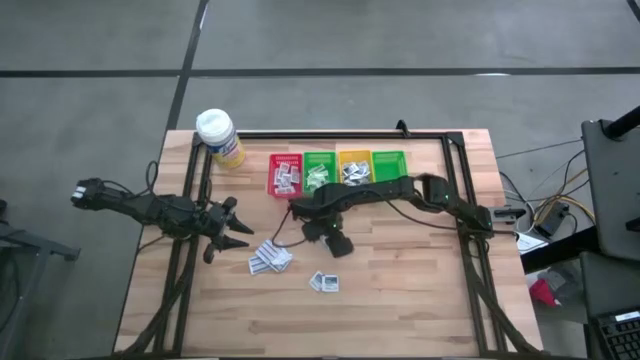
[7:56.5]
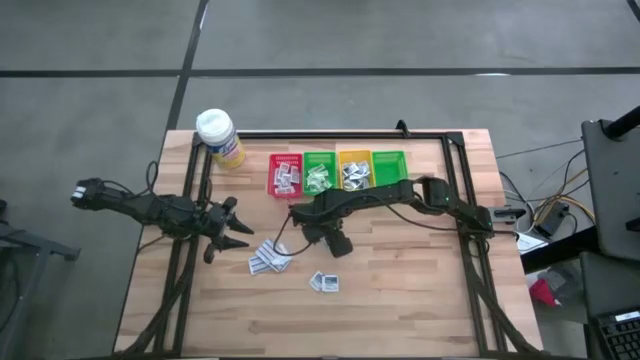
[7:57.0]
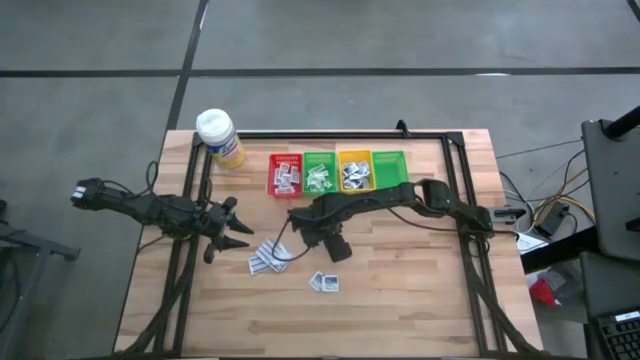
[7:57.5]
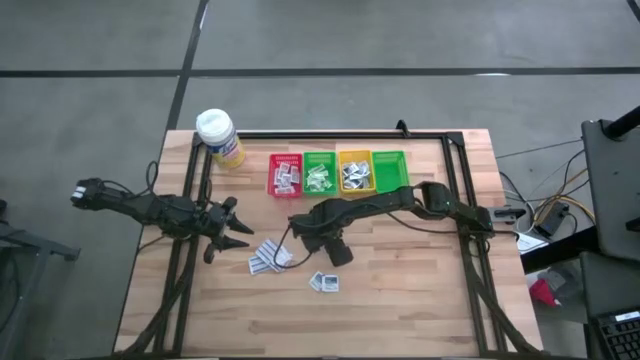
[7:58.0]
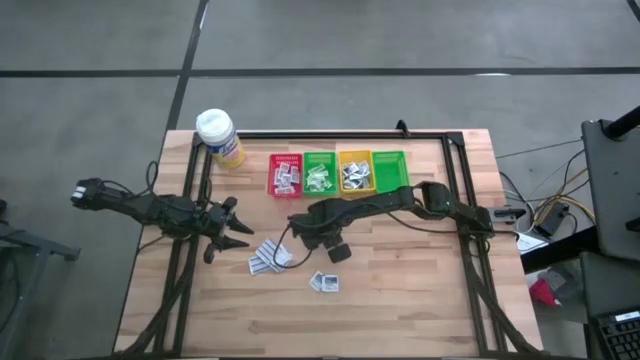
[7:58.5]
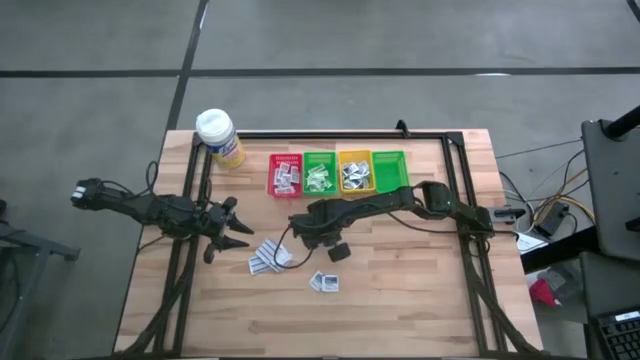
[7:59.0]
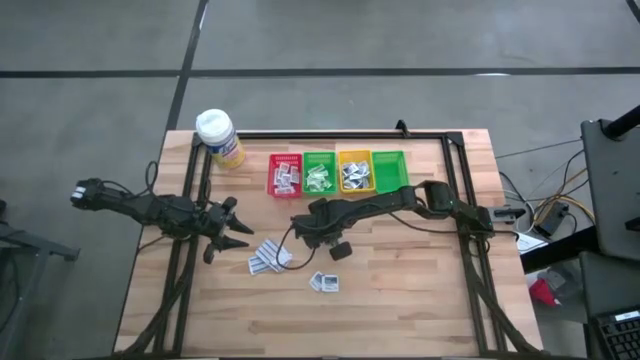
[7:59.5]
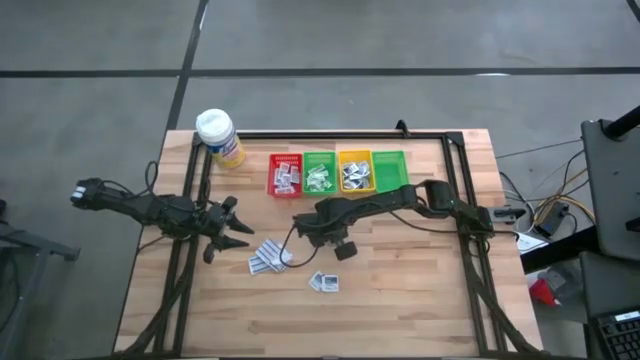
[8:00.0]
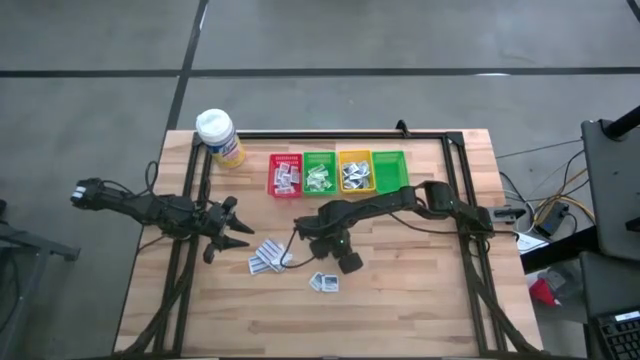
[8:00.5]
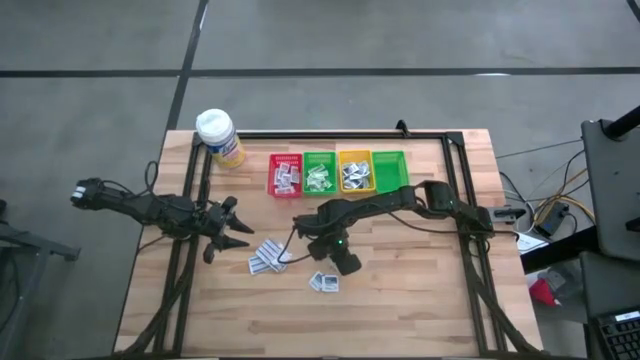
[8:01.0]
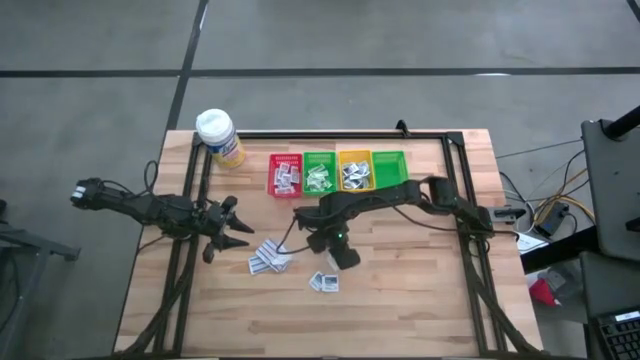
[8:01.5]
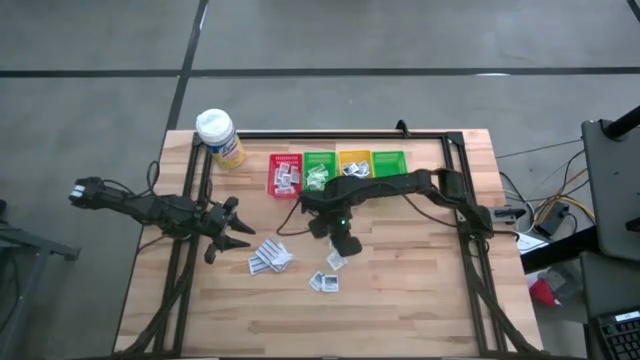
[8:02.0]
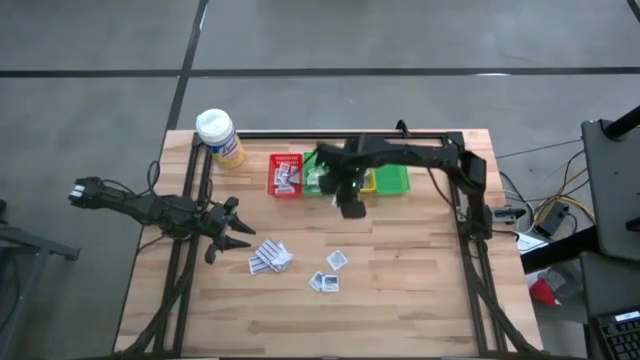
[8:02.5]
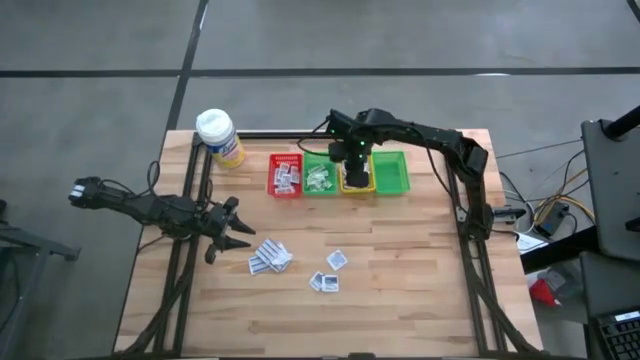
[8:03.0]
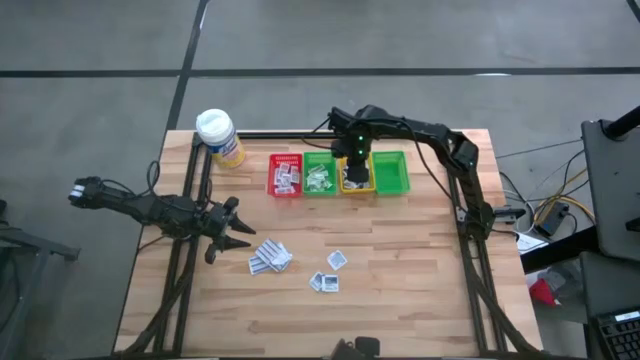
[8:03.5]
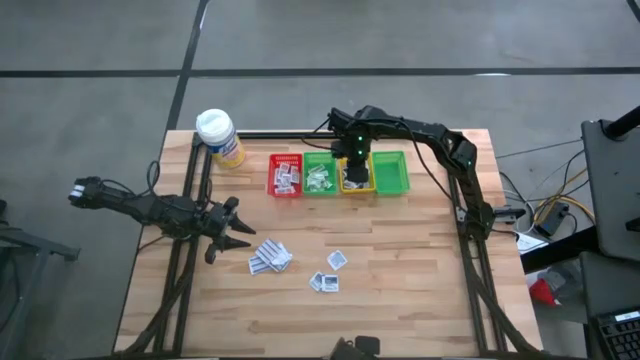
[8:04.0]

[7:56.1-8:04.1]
Task: Pick & Place First Aid Supplies
Put the alcohol pad into the yellow bin

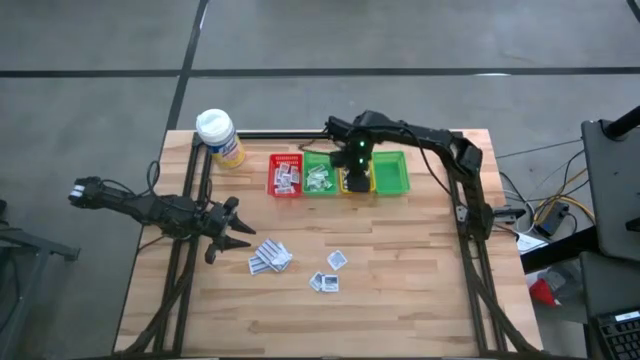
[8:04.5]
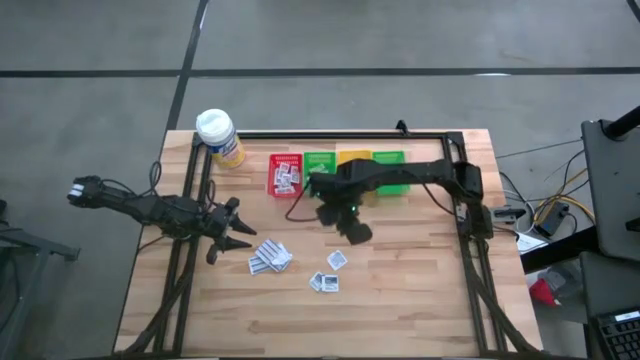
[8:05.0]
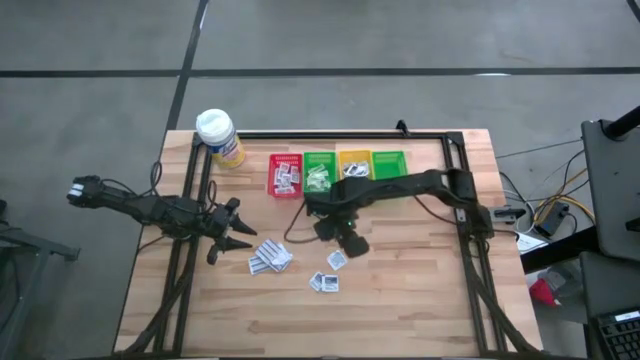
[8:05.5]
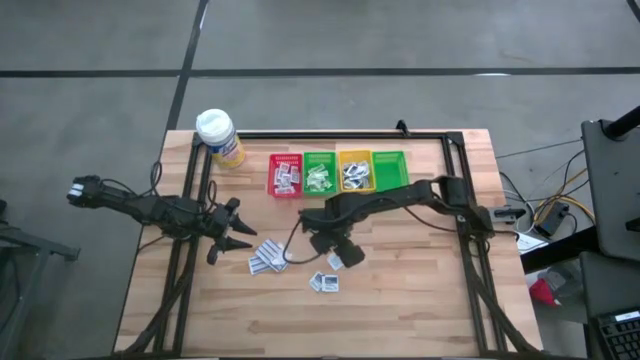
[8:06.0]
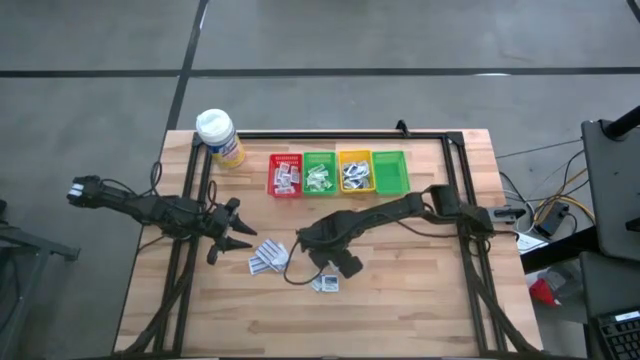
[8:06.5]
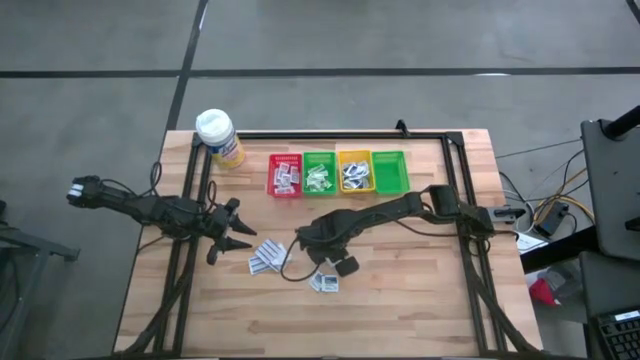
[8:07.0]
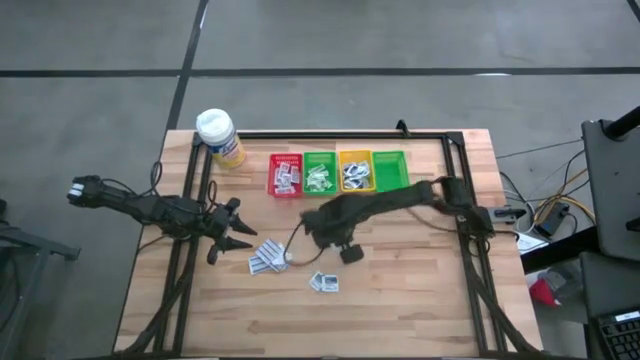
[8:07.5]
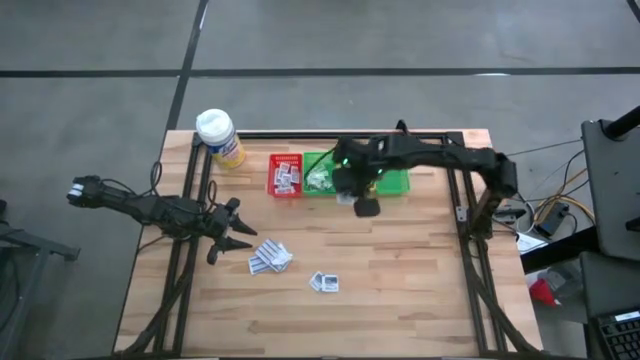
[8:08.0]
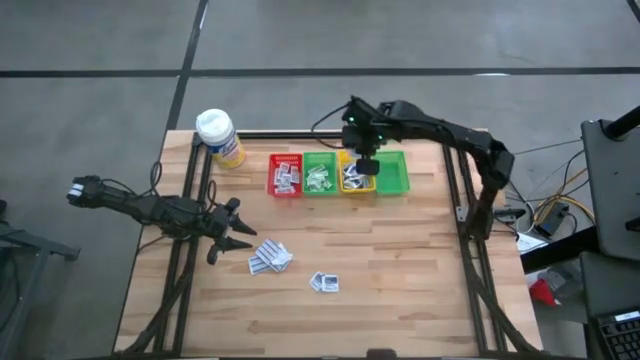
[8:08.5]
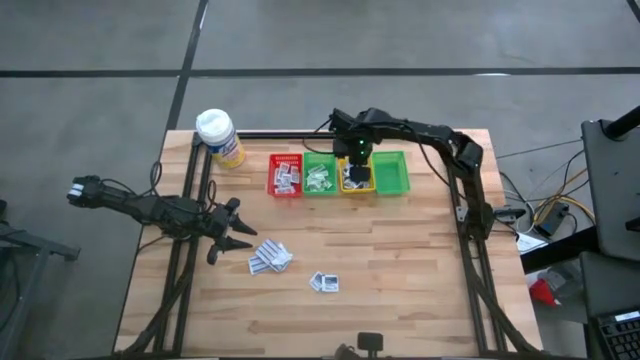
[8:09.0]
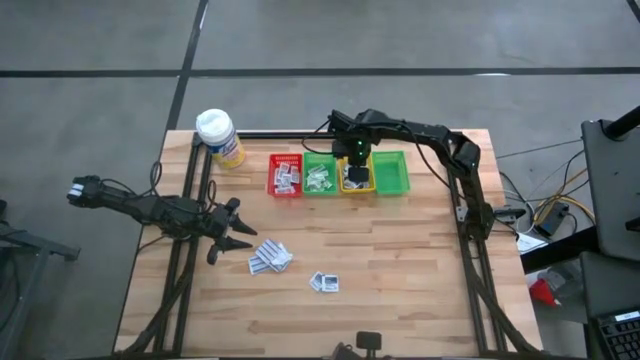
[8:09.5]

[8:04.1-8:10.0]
Put the alcohol pad into the yellow bin

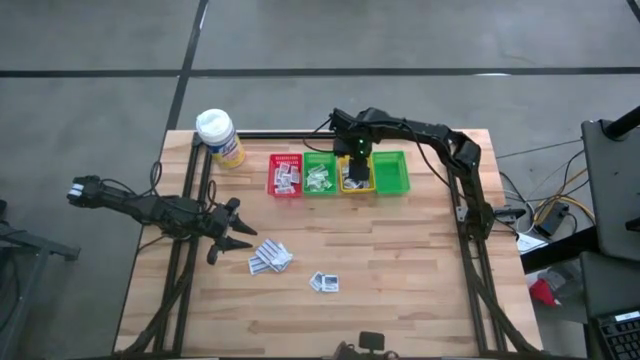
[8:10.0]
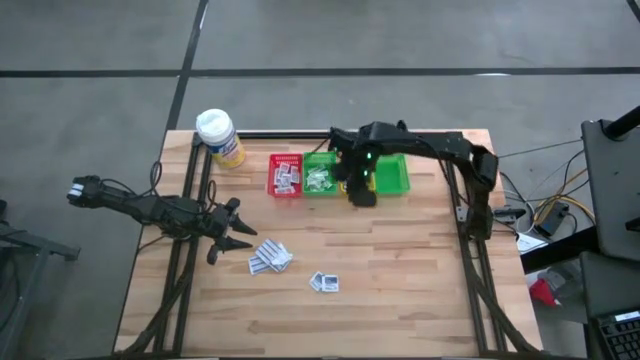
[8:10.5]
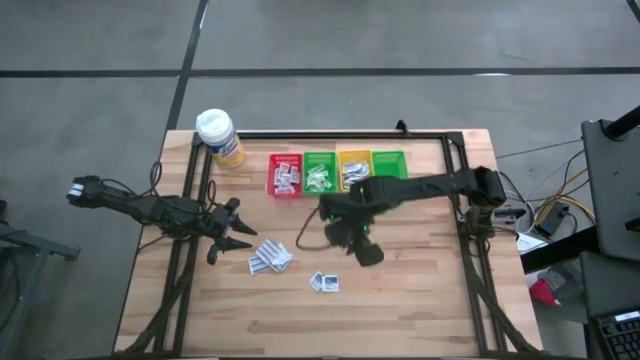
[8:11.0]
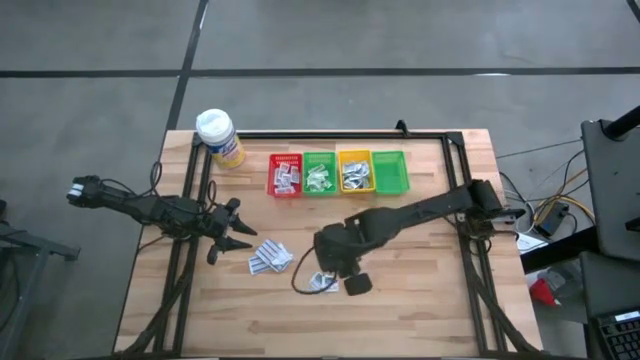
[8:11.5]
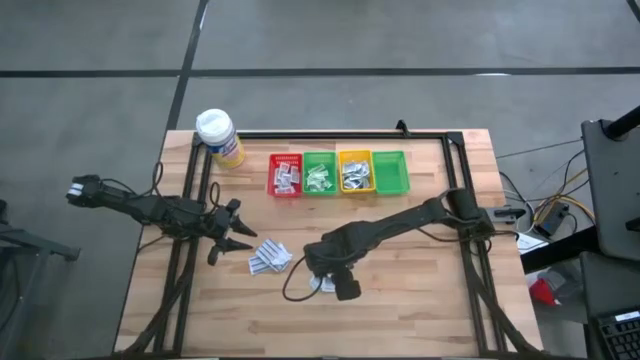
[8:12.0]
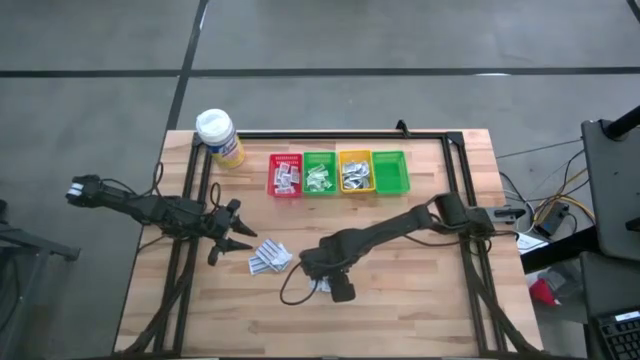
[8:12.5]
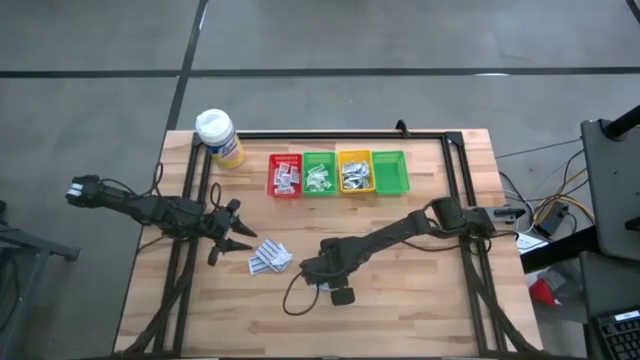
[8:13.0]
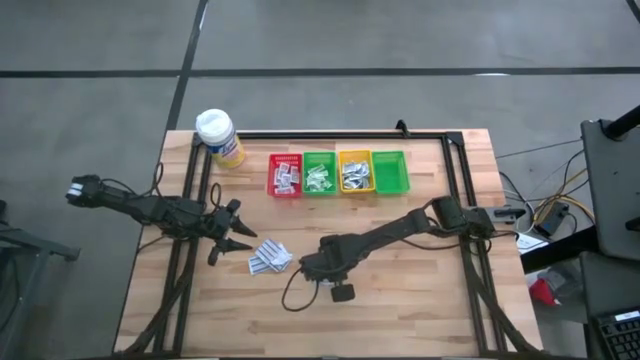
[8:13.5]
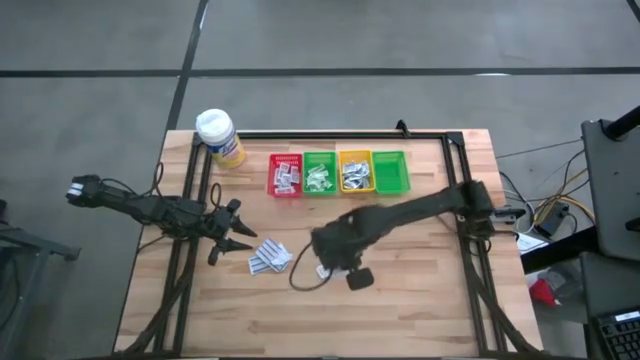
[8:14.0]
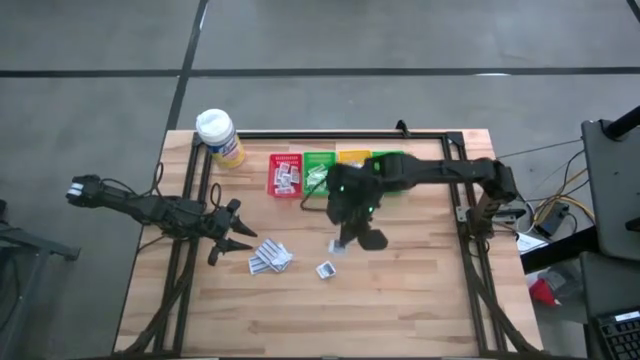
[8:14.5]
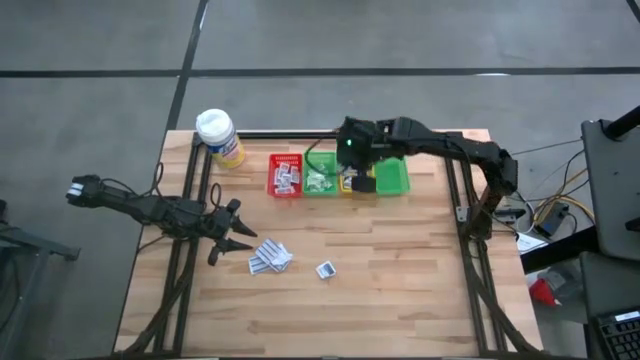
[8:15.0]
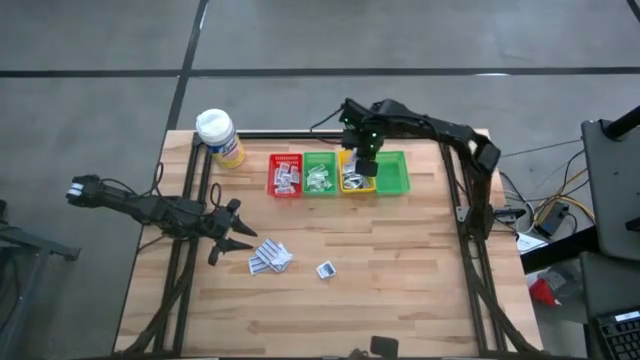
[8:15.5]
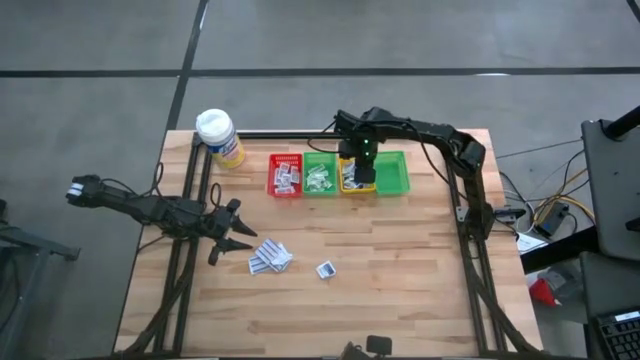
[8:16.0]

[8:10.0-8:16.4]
Put the alcohol pad into the yellow bin
